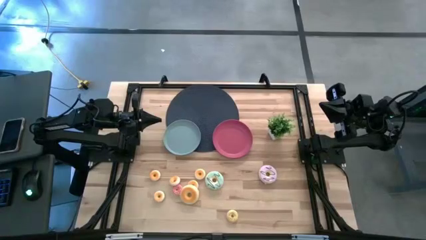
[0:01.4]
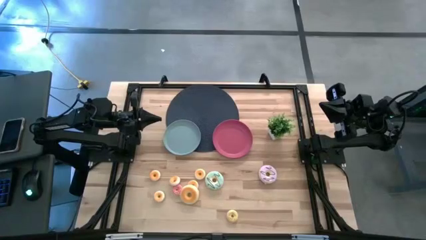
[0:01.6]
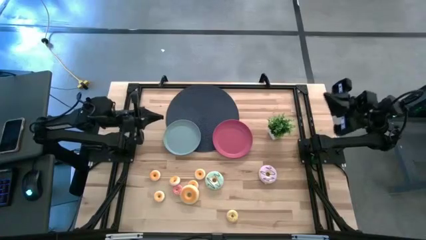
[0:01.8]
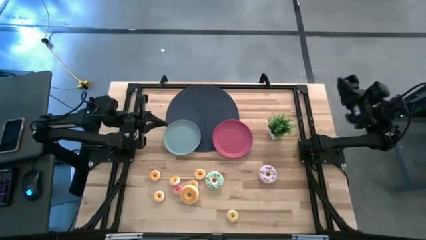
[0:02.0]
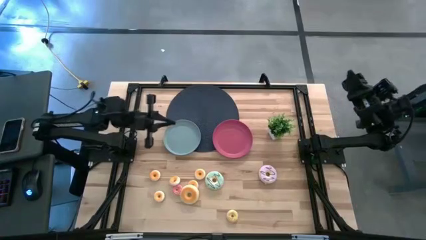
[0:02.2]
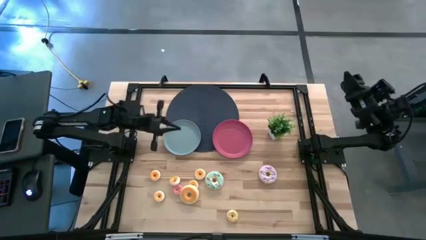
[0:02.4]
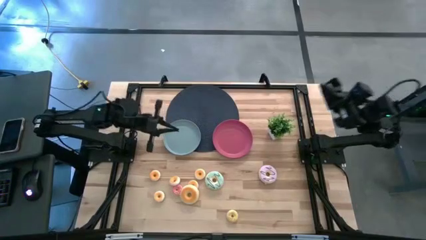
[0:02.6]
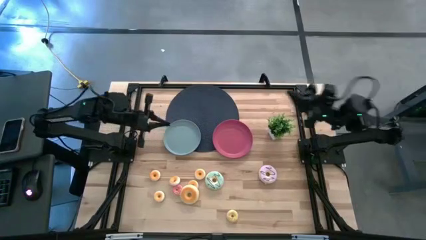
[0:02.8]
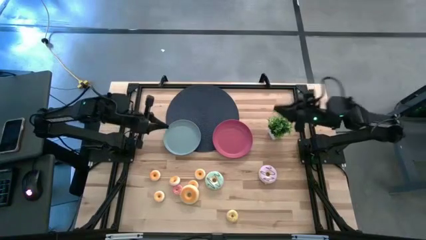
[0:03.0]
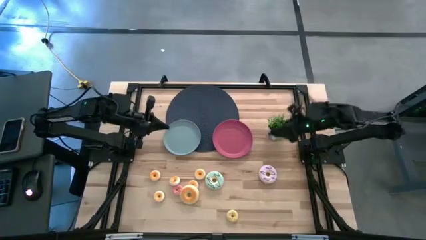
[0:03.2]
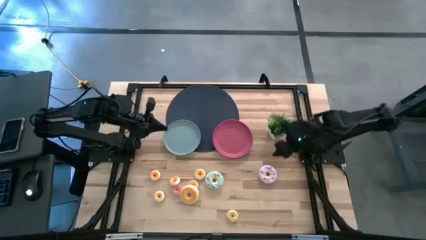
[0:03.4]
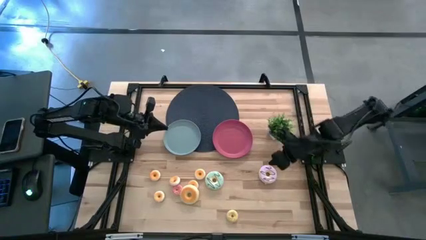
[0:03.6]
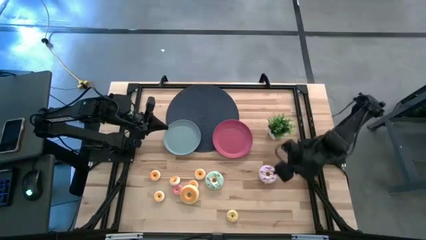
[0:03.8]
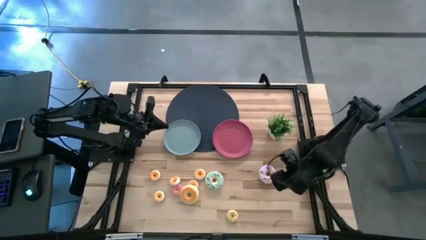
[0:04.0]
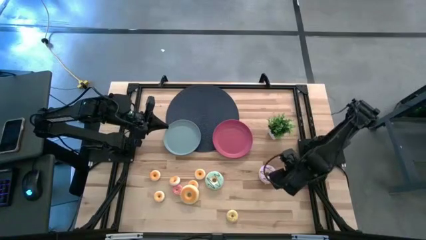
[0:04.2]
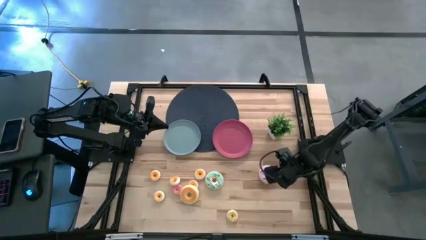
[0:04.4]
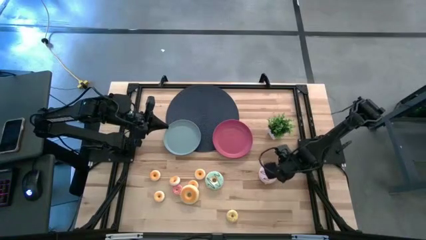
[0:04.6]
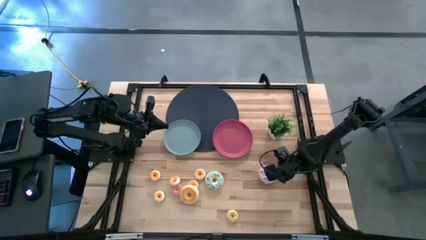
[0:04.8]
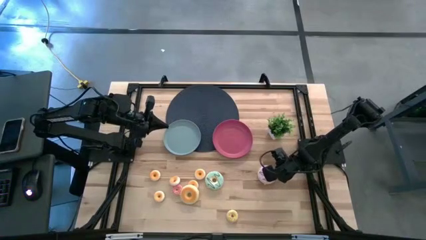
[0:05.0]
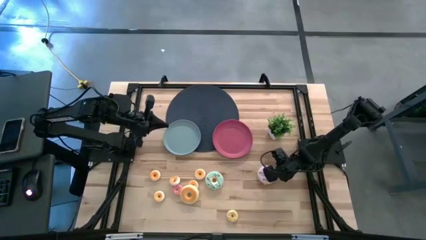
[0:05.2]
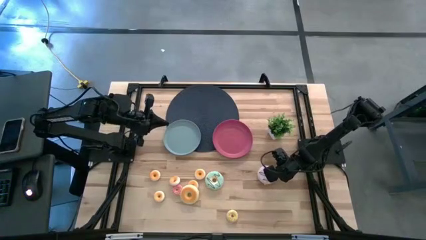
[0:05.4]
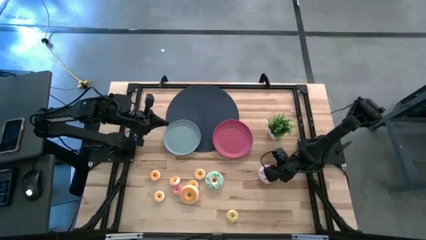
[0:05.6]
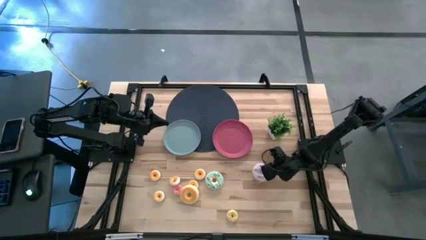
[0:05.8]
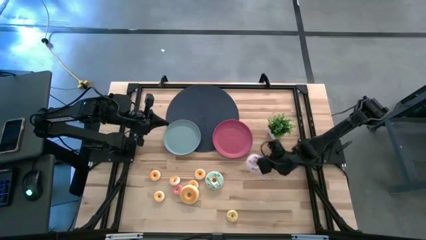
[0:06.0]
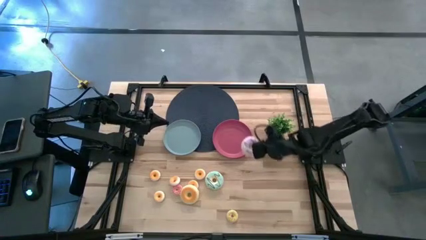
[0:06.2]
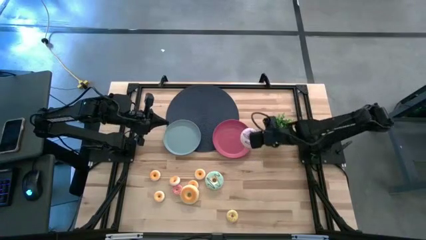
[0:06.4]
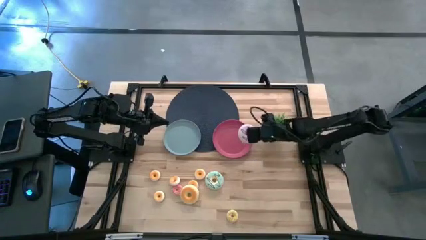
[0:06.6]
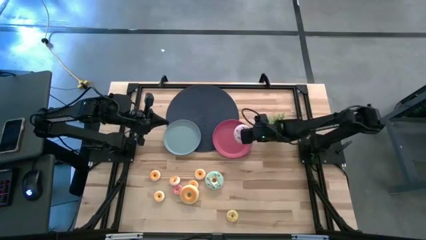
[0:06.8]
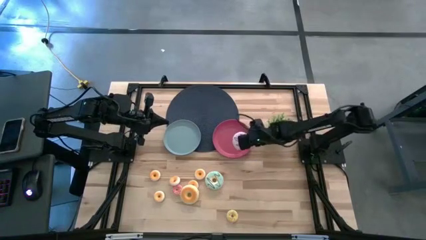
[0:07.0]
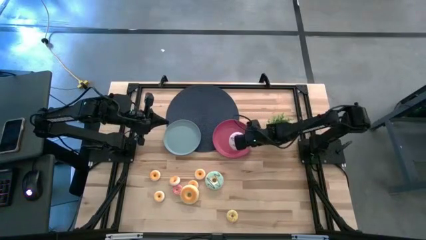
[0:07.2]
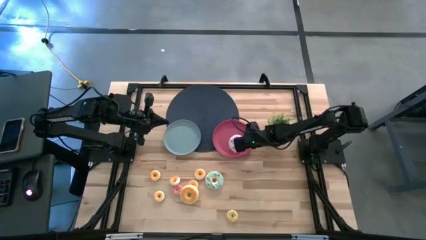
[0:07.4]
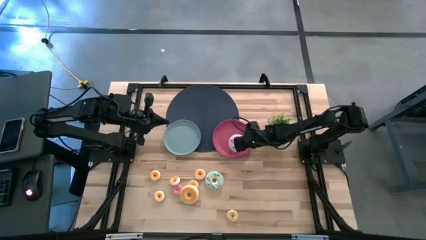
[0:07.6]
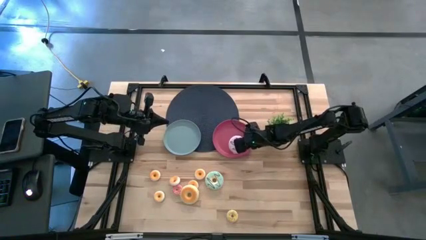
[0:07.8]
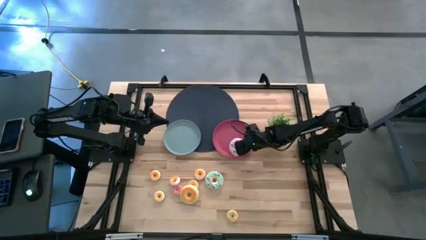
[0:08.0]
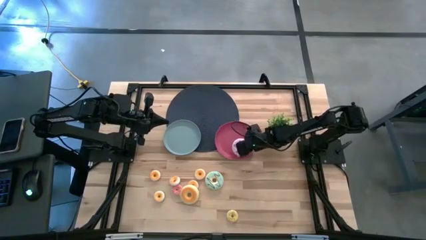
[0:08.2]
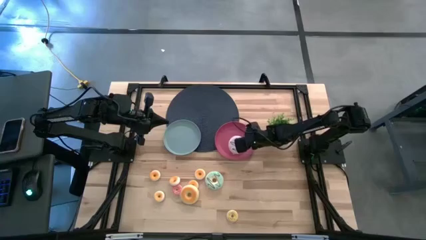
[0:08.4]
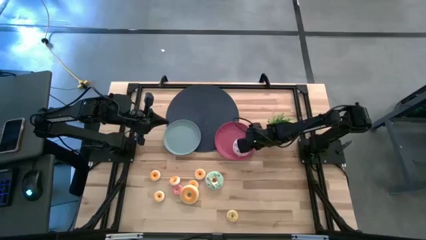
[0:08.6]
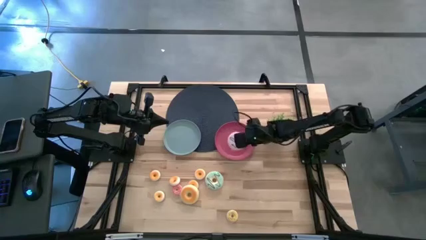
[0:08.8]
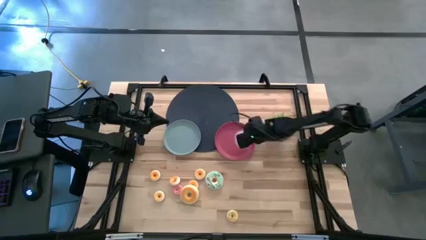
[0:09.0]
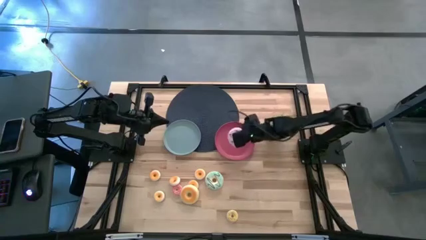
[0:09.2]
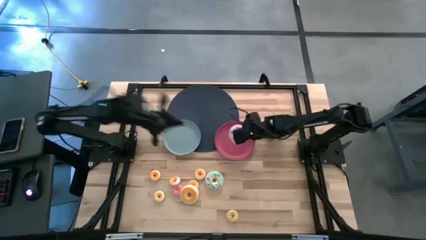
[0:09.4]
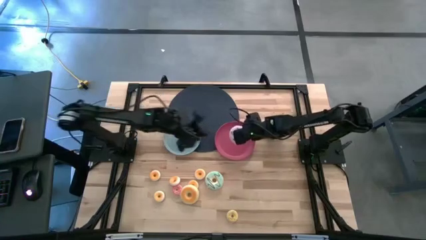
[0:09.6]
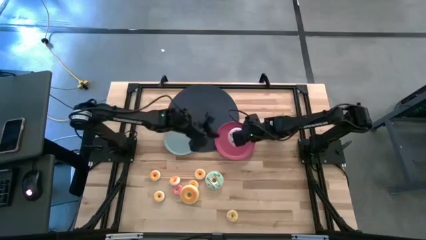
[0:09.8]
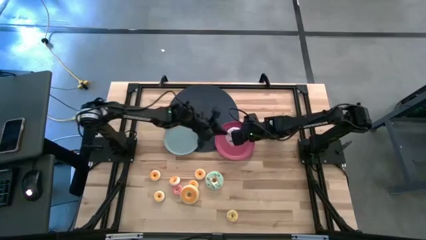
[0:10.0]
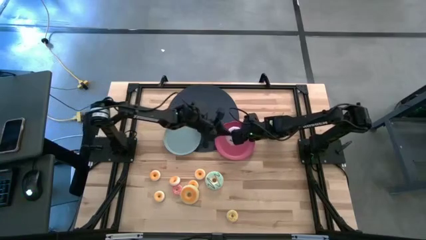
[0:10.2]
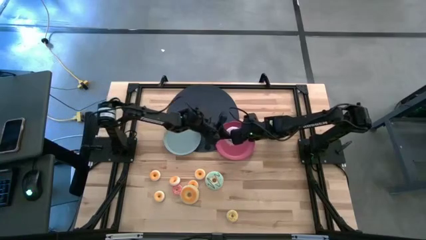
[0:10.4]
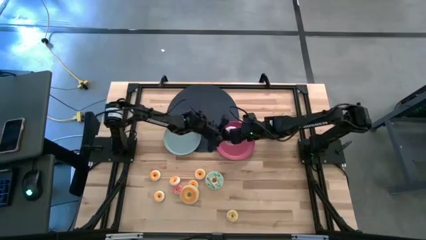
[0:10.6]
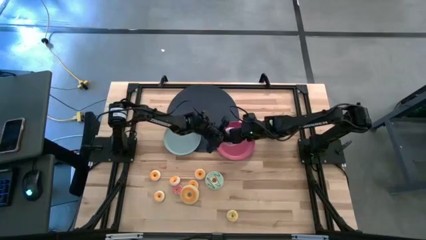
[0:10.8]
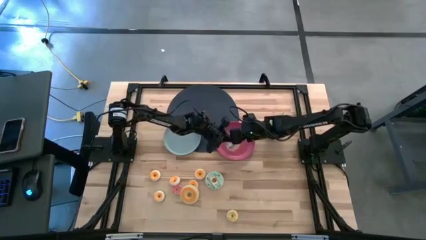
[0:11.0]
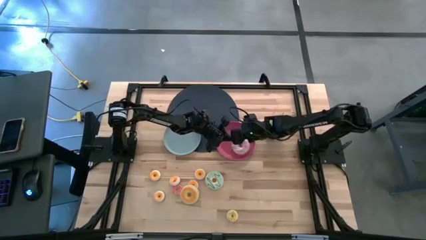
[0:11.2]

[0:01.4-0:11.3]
Task: Pick & Place donuts
Put the large purple doughnut on the pink plate

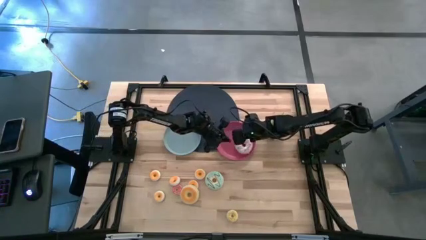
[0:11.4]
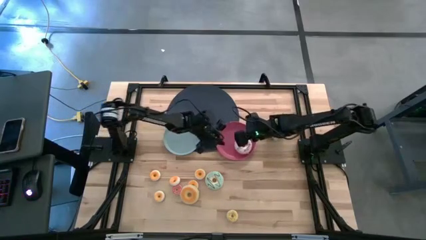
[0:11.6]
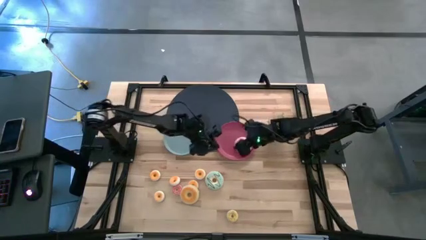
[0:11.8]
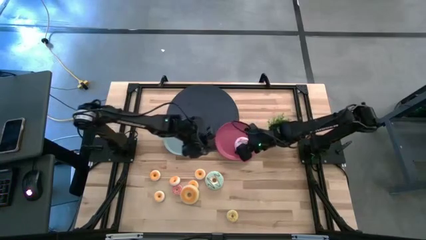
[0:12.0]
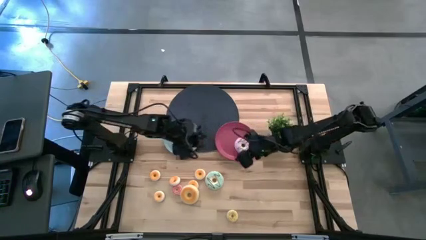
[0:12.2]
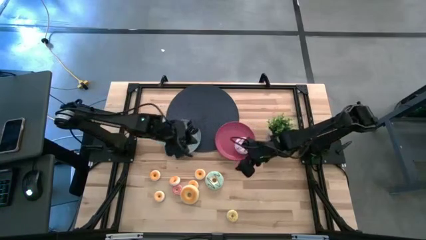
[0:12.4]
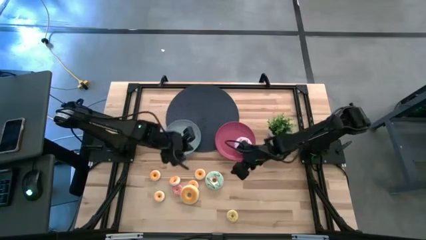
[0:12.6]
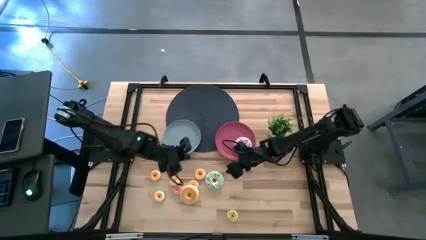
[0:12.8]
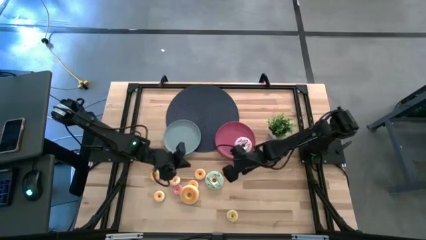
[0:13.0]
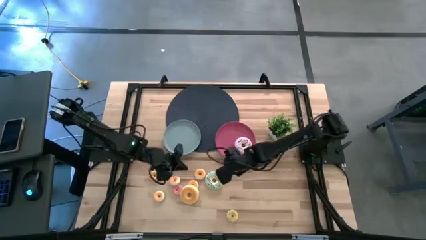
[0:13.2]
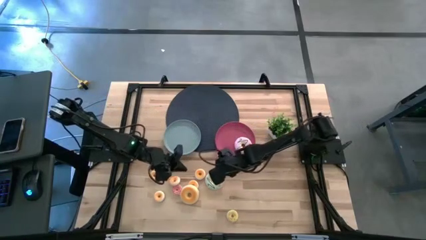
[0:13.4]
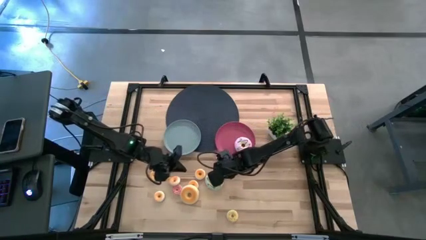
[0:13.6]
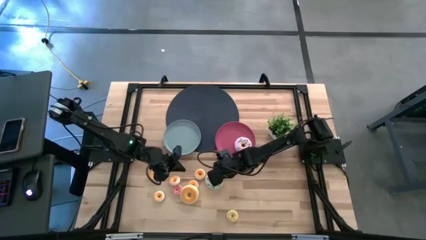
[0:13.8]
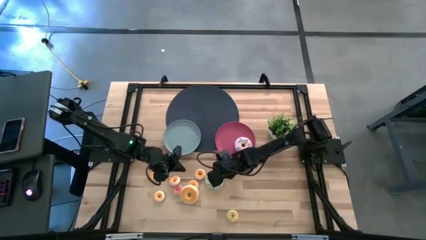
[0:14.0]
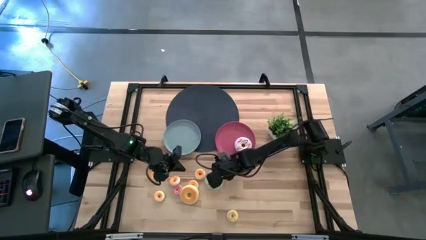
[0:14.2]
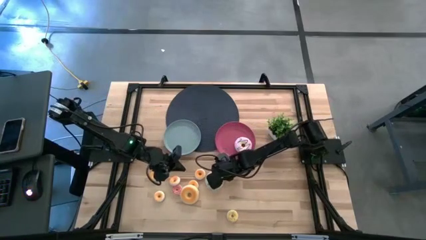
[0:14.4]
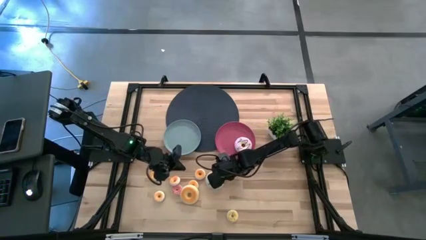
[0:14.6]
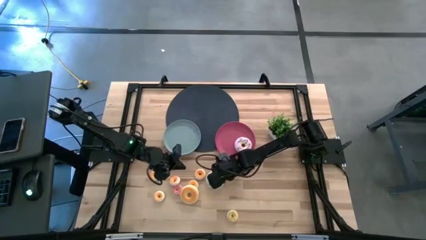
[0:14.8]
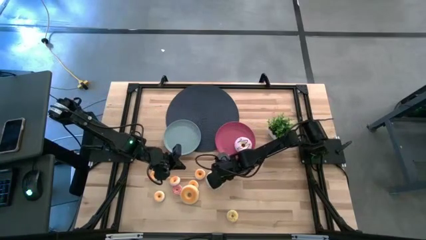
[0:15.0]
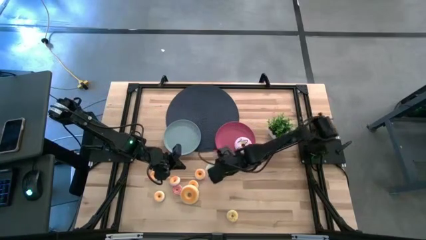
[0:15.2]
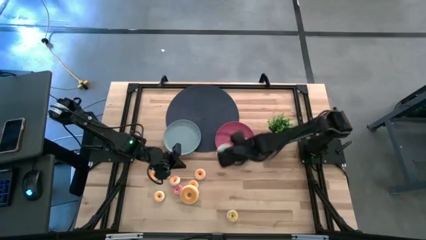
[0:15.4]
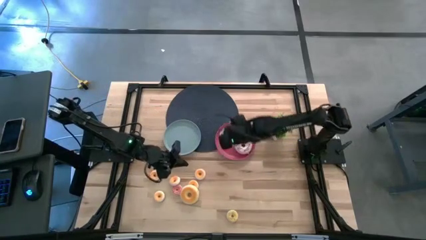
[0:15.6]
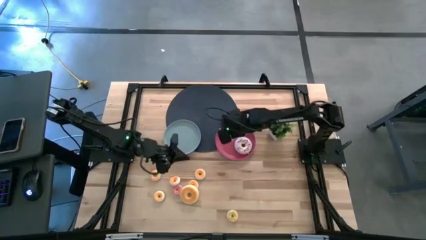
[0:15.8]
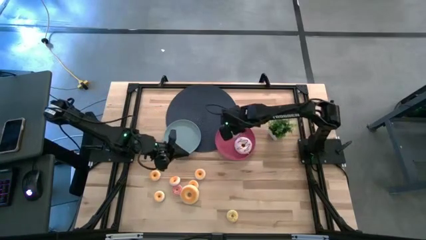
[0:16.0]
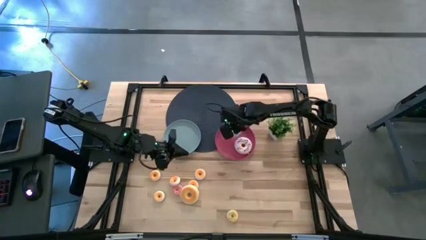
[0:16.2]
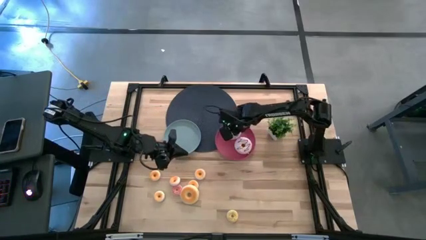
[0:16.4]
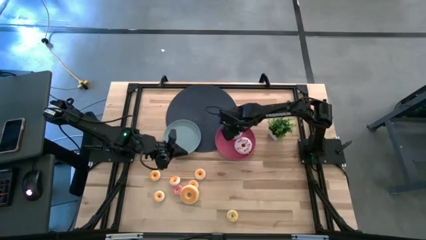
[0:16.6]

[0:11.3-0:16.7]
Put the large light blue doughnut on the pink plate
